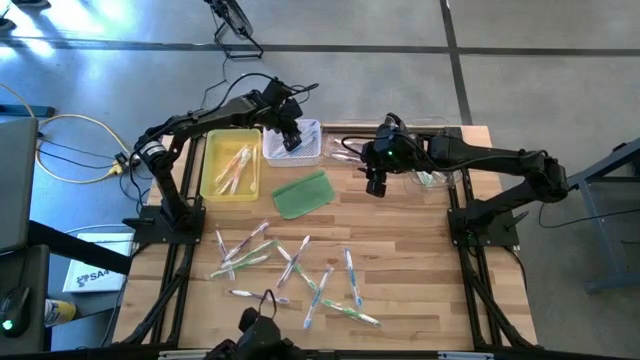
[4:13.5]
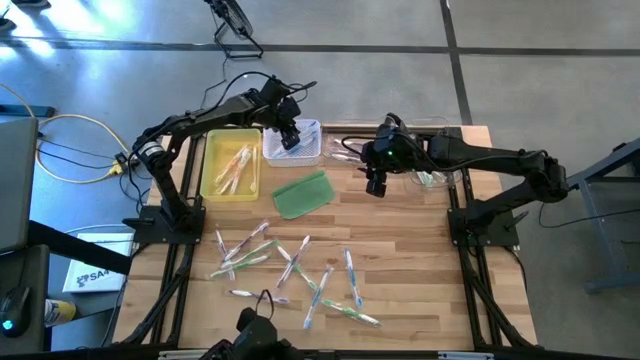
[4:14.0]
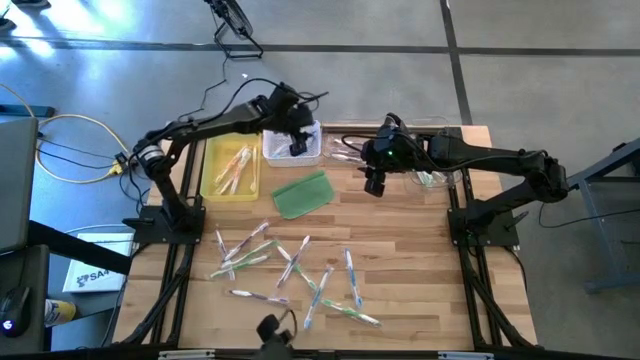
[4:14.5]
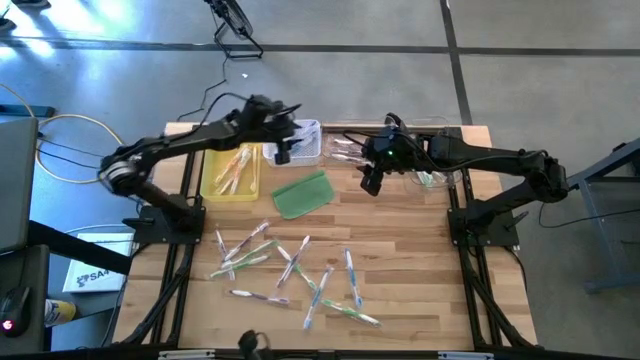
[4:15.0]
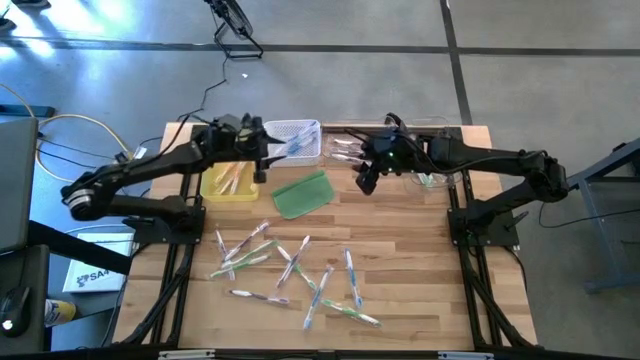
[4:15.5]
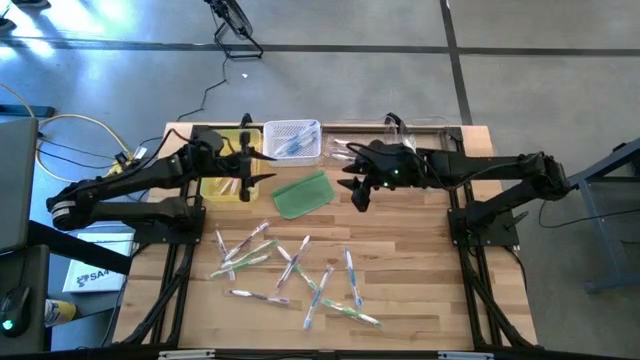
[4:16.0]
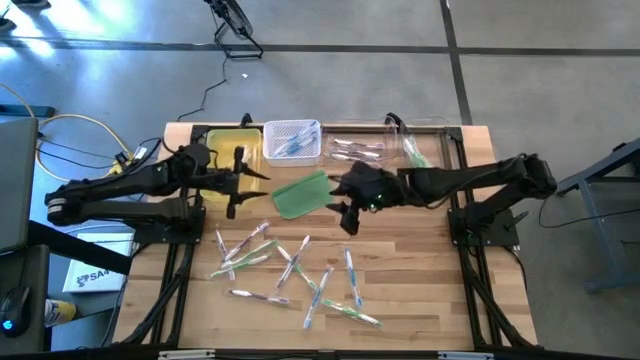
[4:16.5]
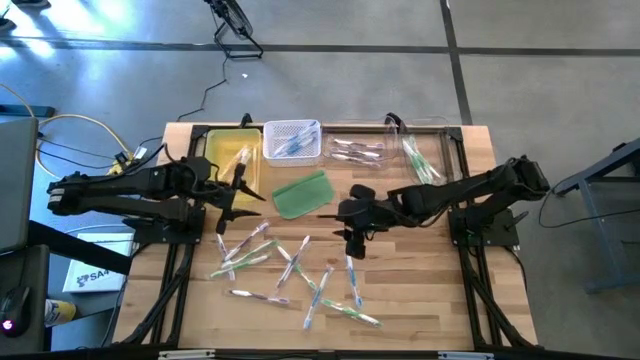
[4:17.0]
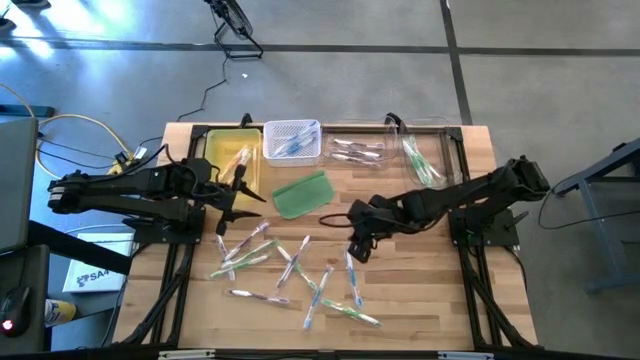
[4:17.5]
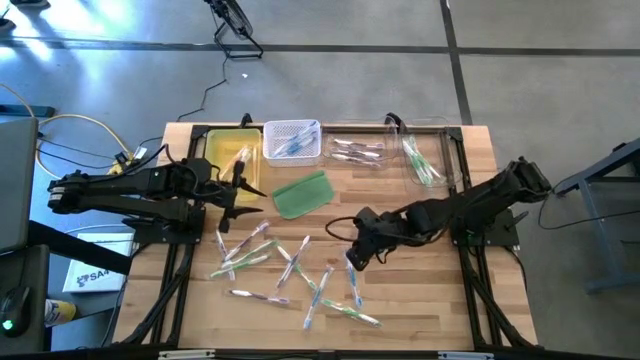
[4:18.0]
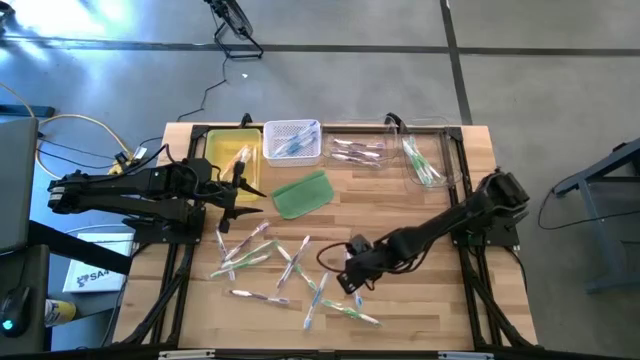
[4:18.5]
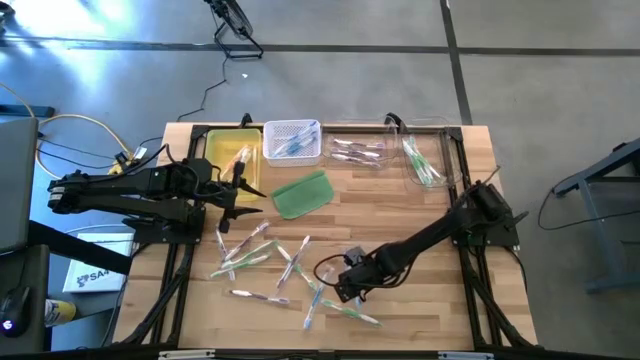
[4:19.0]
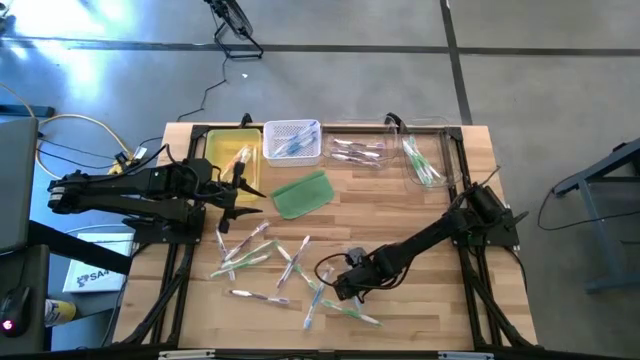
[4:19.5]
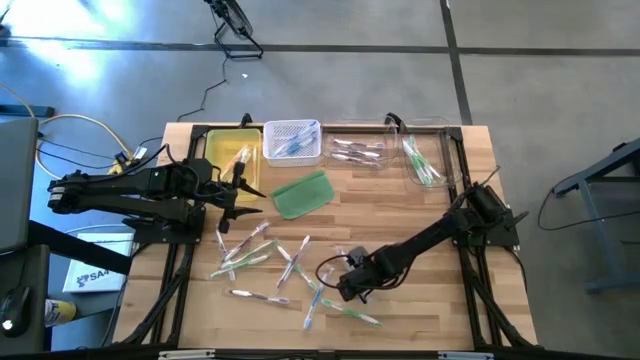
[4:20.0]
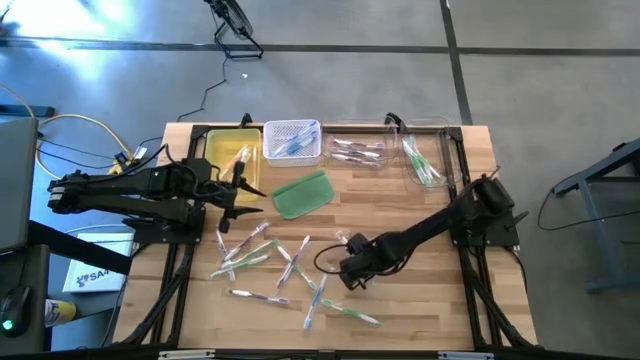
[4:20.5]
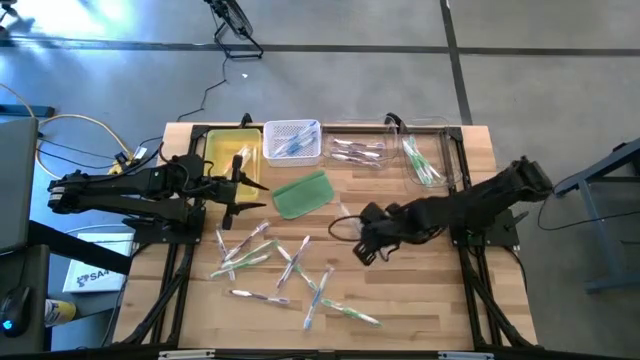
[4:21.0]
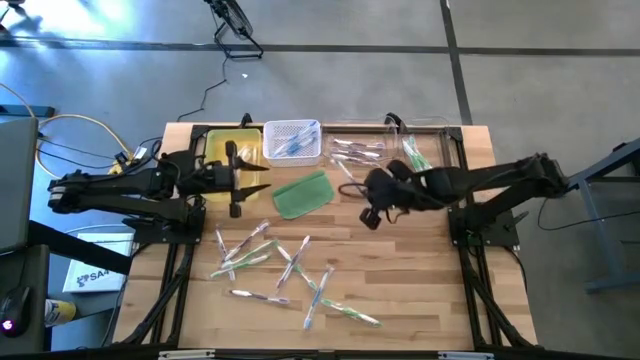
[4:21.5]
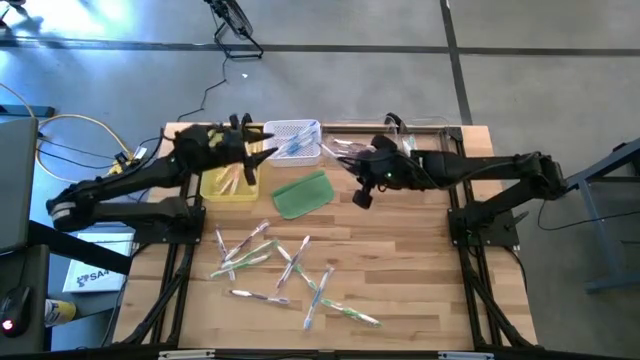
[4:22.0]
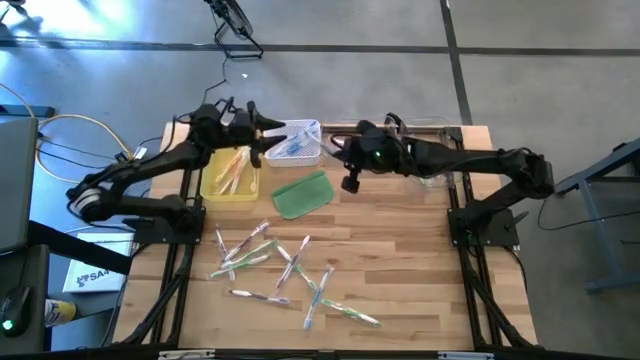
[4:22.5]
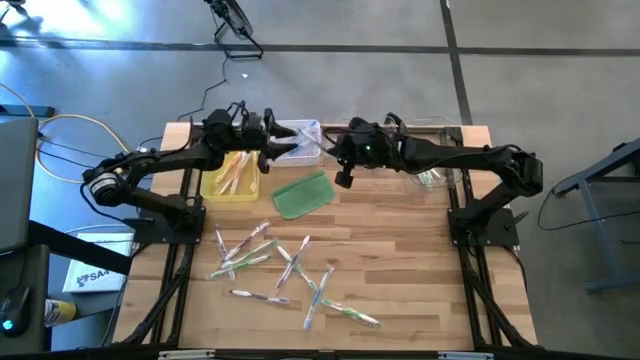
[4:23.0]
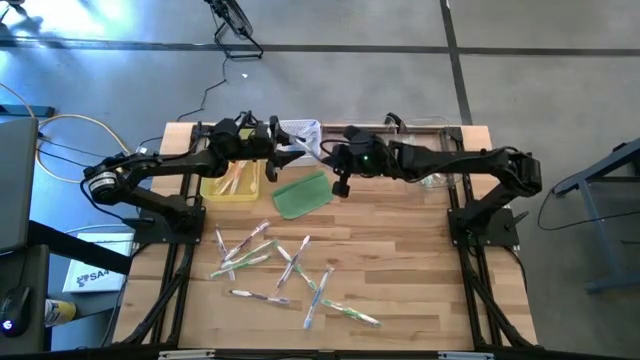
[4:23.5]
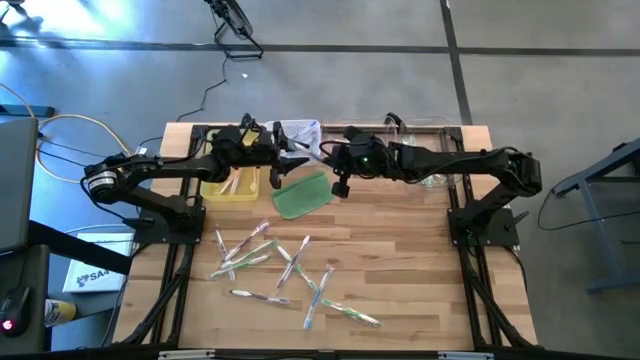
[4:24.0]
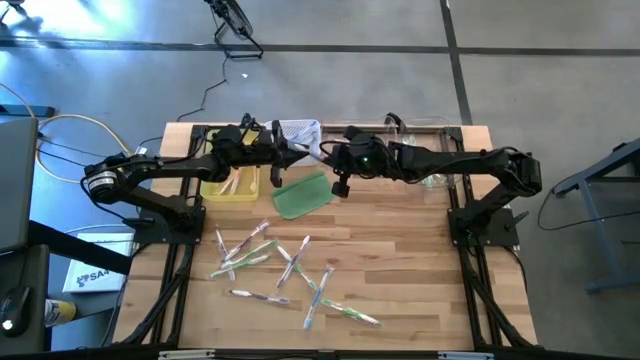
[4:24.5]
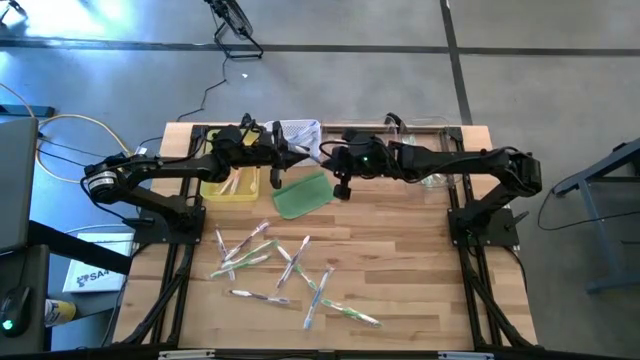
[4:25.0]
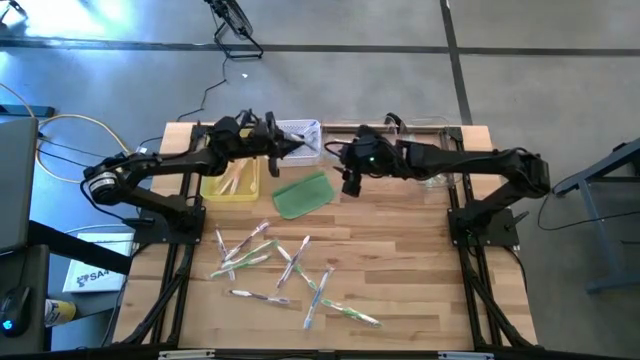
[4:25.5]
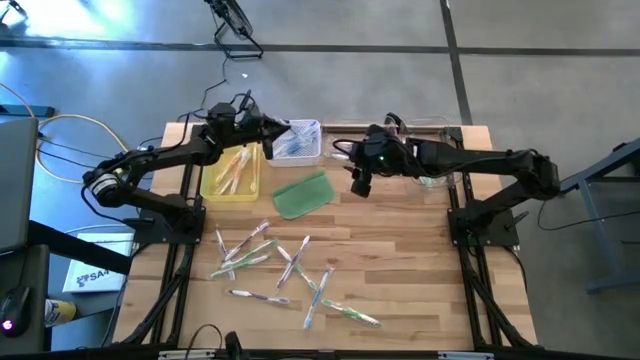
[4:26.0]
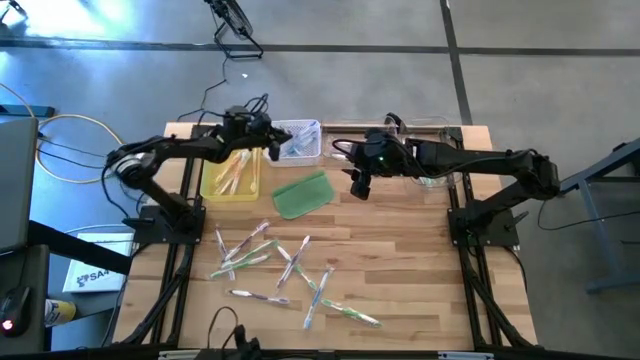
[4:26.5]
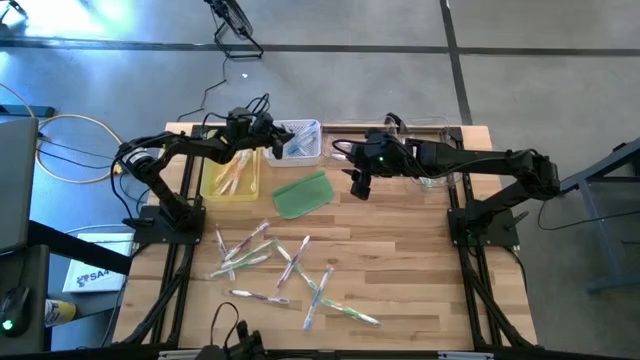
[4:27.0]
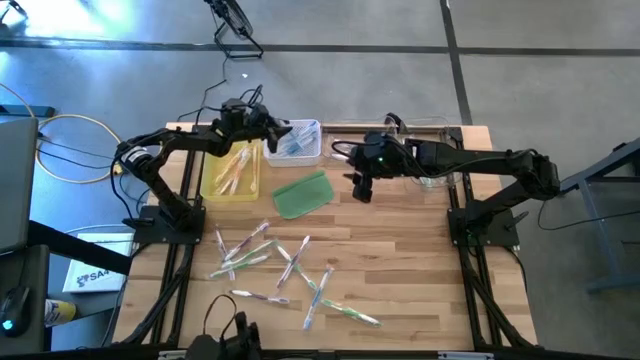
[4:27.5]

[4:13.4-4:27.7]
Task: Pick & Place Toothbrushes
Put the blue toothbrush into the white bin

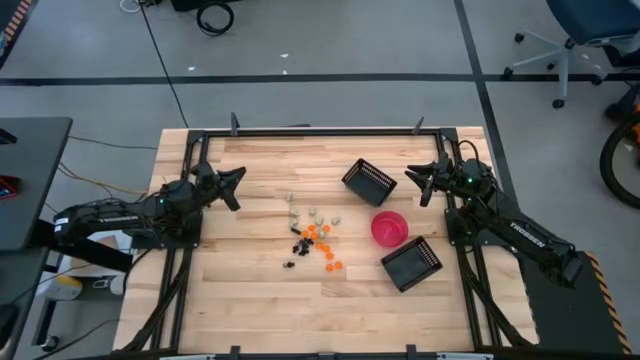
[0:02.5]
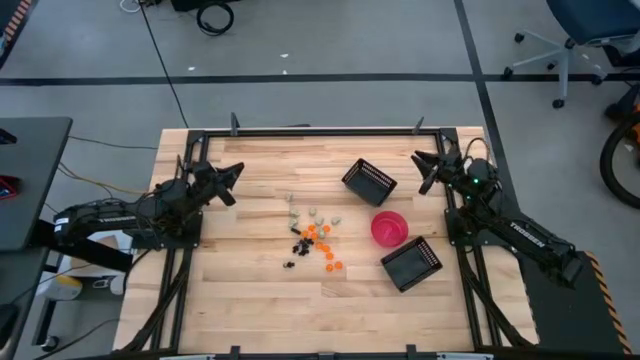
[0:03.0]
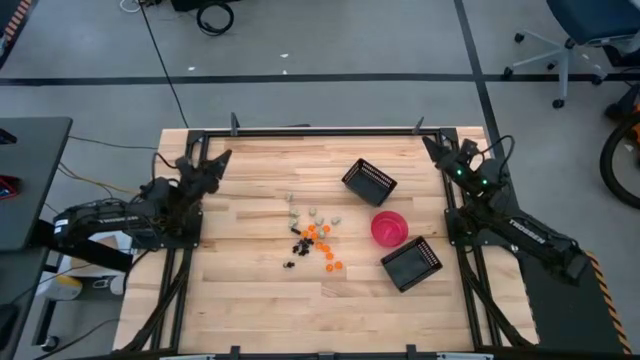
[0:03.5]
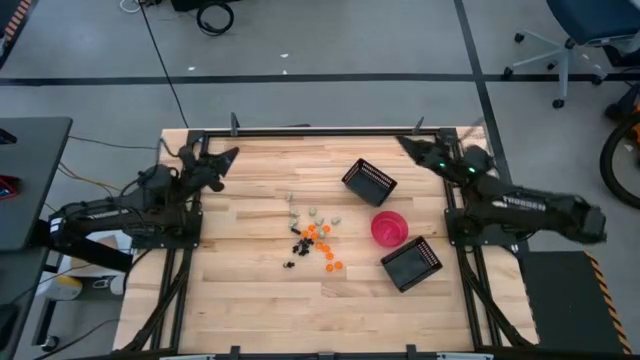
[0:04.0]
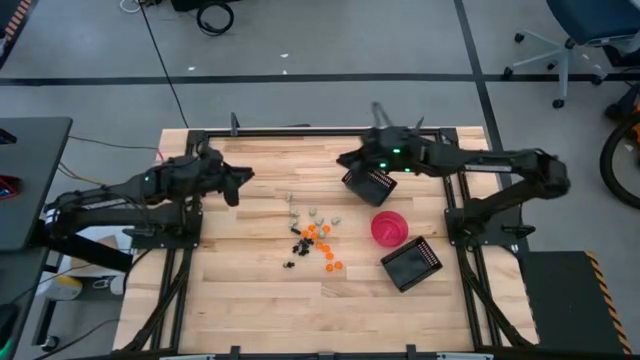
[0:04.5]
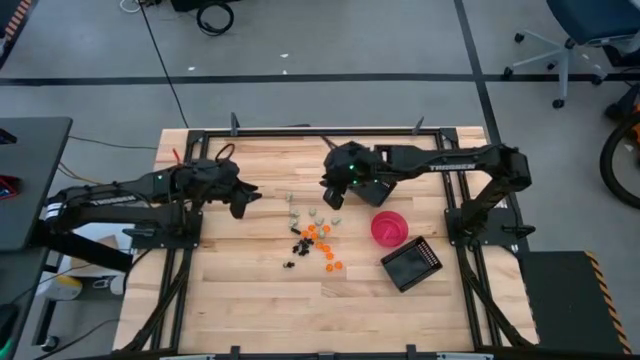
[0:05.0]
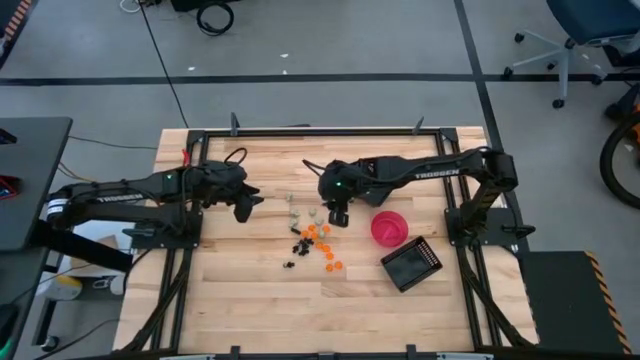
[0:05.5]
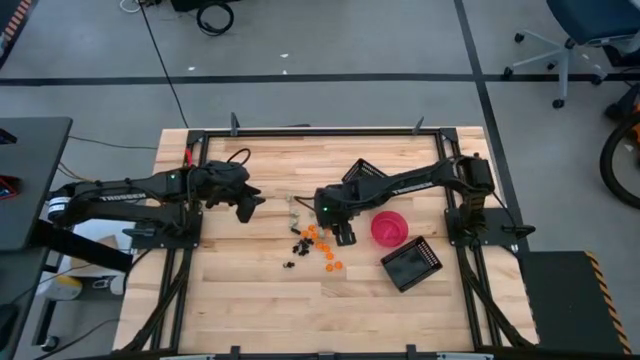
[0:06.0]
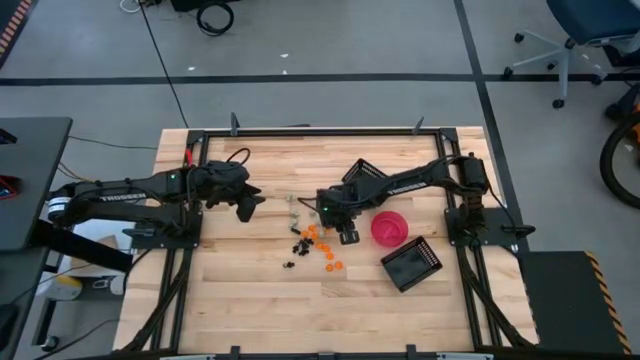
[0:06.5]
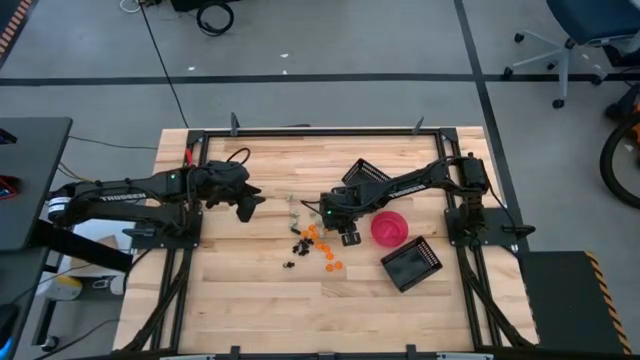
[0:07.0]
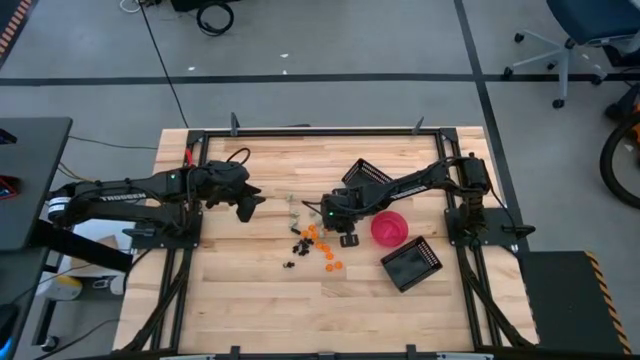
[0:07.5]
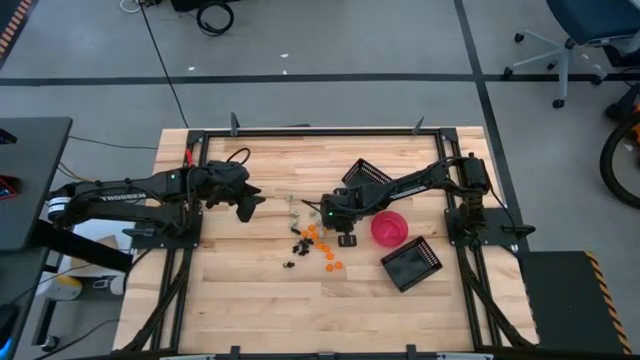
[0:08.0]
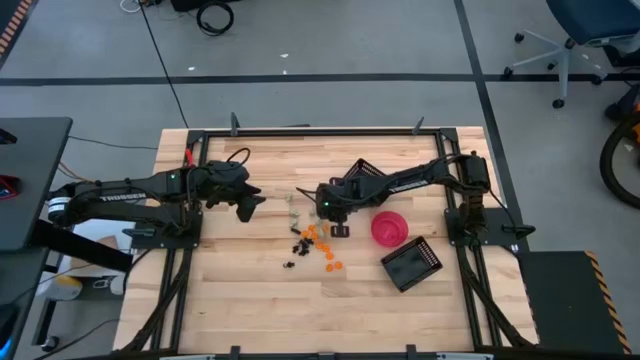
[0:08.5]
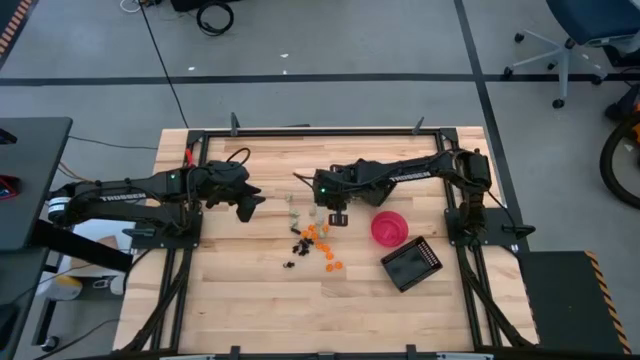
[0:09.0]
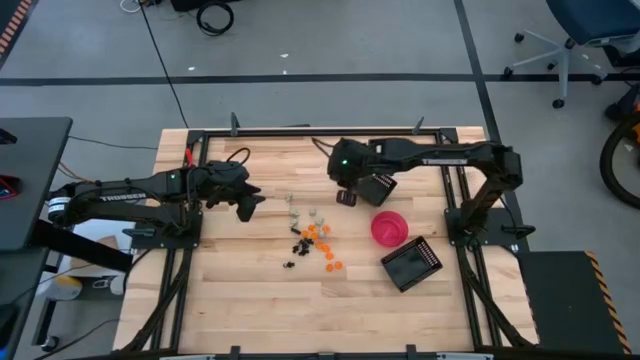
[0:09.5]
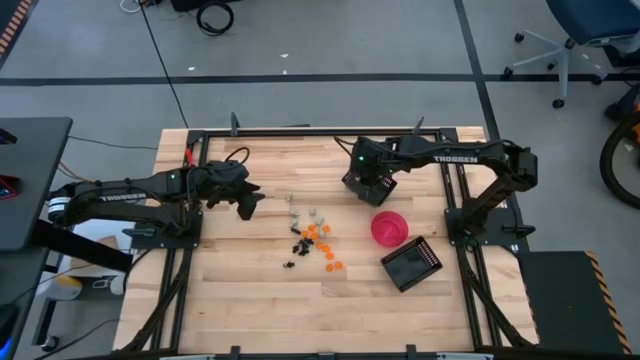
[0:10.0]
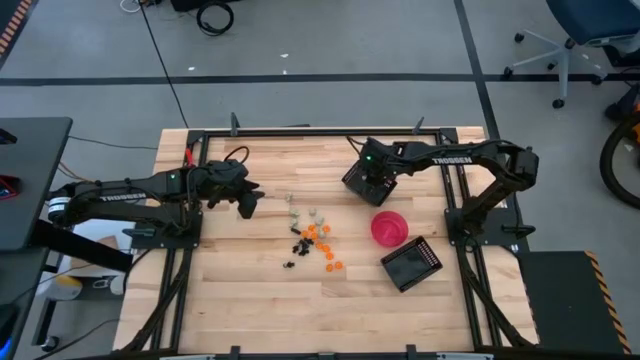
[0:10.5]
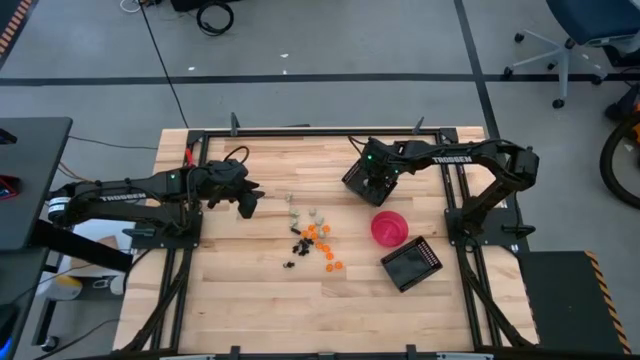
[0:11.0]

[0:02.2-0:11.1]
Task: Sort Halloween decoration
Put the white skull toy into the top black basket
